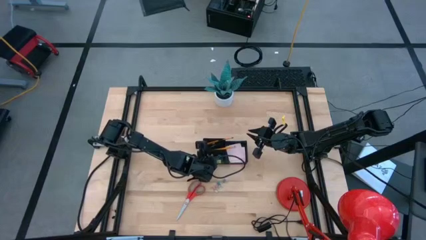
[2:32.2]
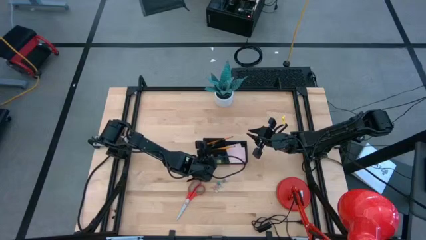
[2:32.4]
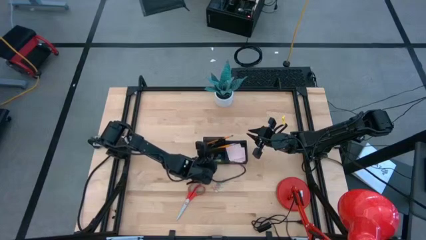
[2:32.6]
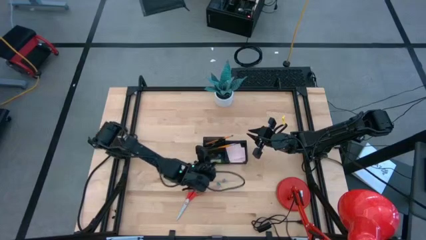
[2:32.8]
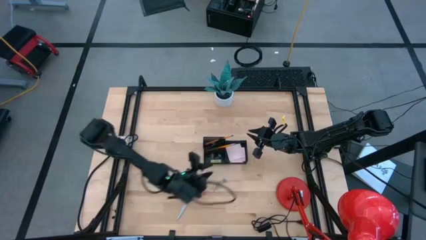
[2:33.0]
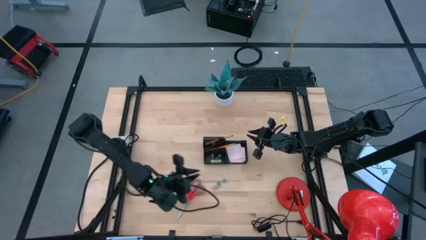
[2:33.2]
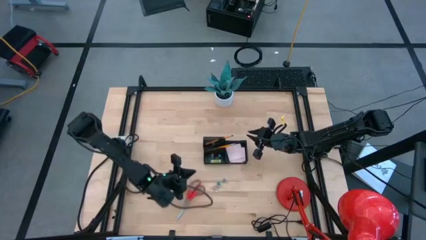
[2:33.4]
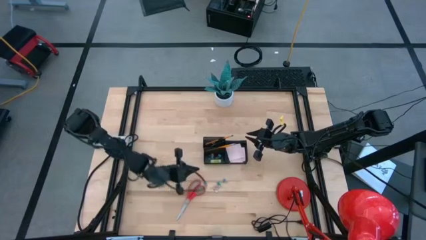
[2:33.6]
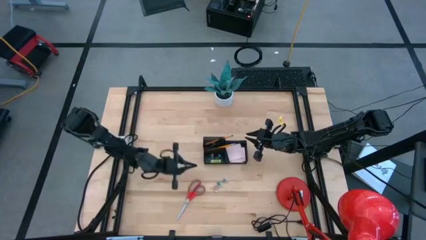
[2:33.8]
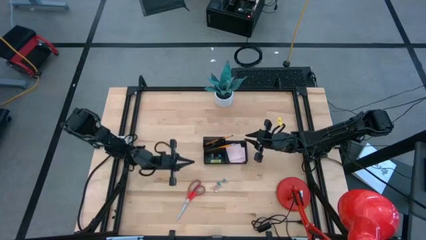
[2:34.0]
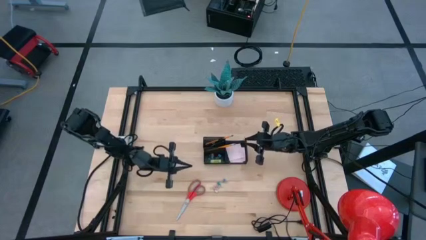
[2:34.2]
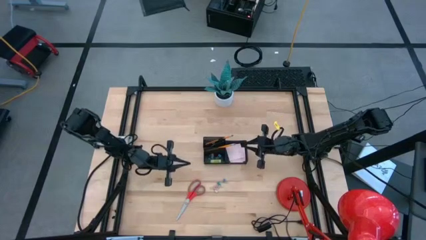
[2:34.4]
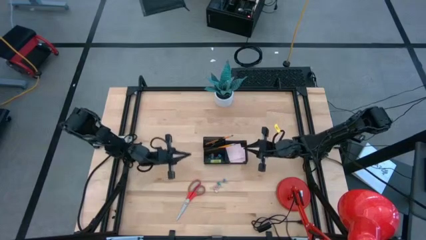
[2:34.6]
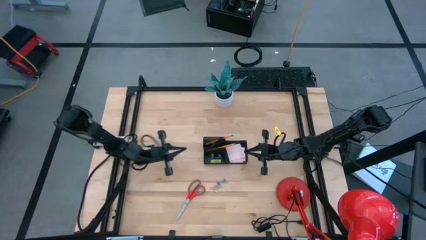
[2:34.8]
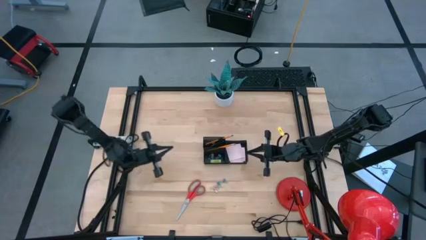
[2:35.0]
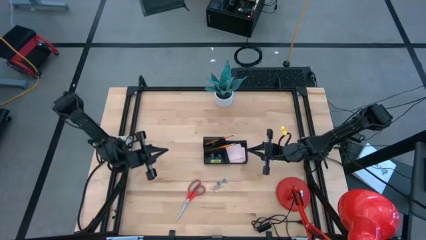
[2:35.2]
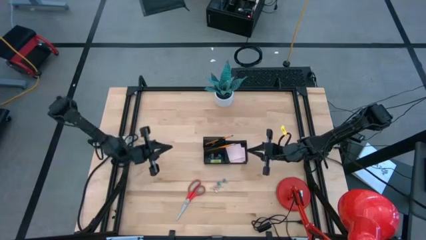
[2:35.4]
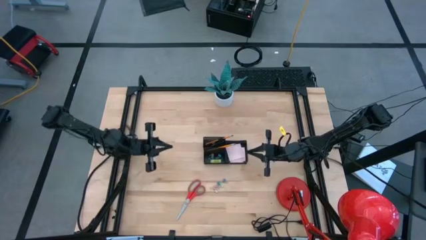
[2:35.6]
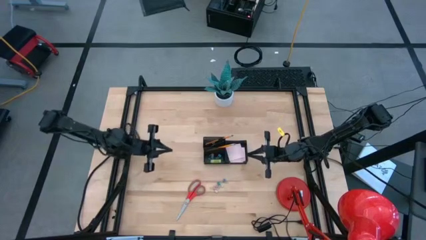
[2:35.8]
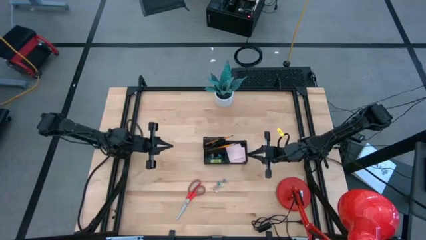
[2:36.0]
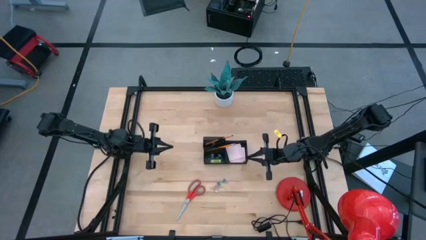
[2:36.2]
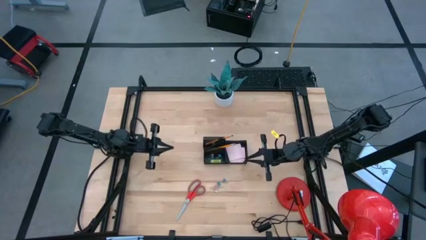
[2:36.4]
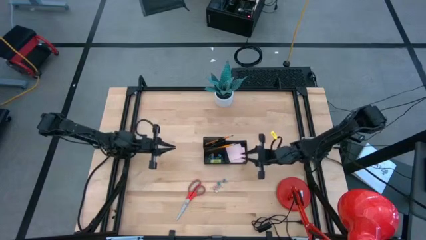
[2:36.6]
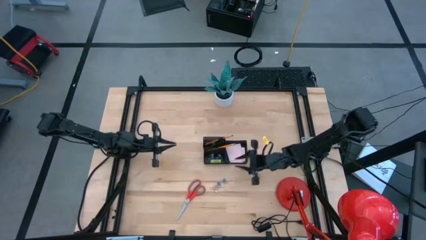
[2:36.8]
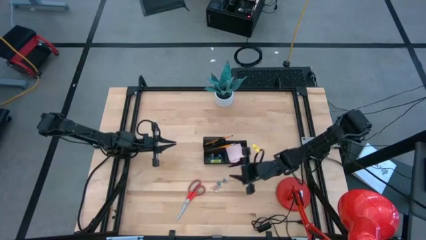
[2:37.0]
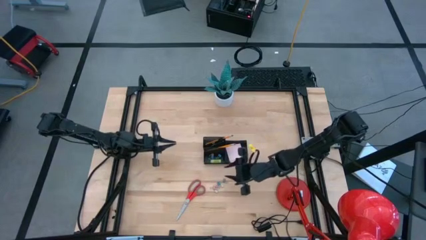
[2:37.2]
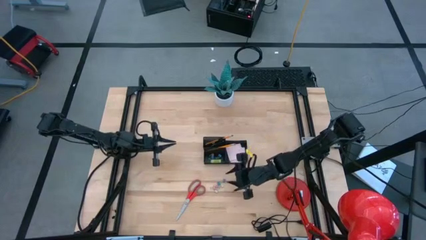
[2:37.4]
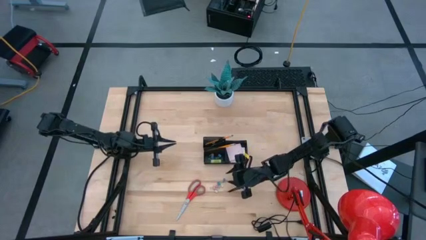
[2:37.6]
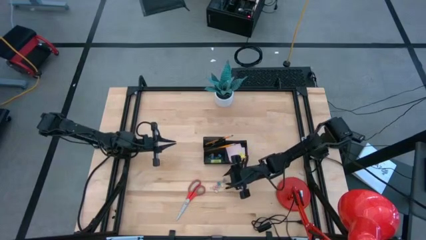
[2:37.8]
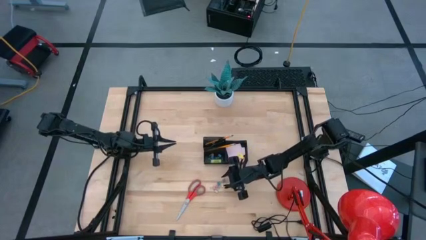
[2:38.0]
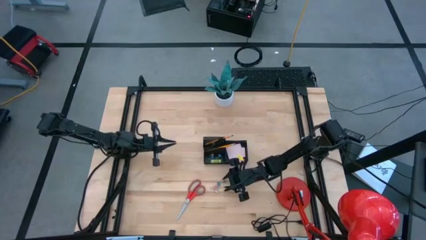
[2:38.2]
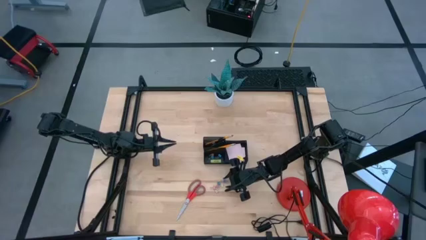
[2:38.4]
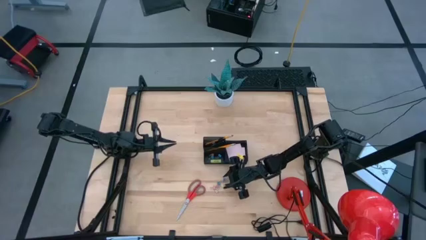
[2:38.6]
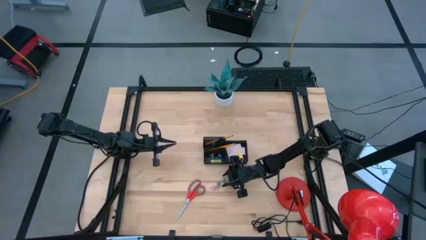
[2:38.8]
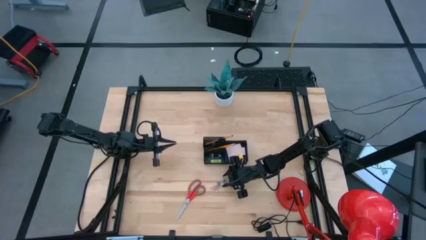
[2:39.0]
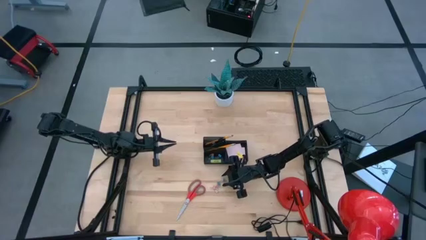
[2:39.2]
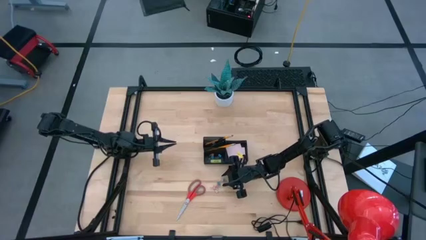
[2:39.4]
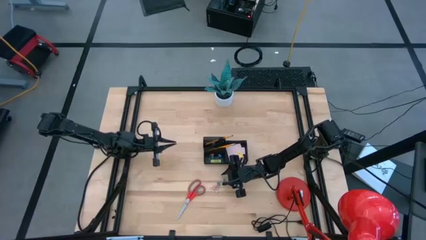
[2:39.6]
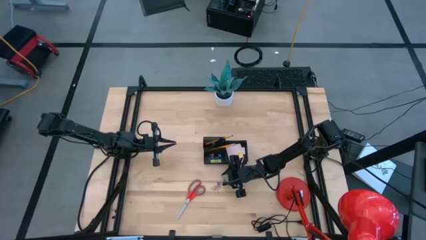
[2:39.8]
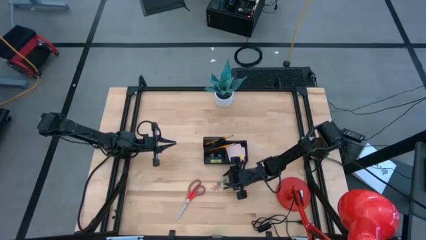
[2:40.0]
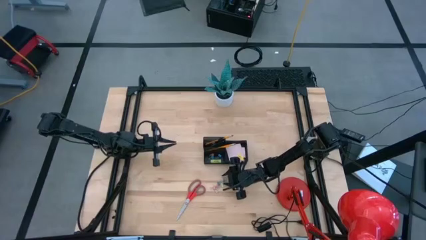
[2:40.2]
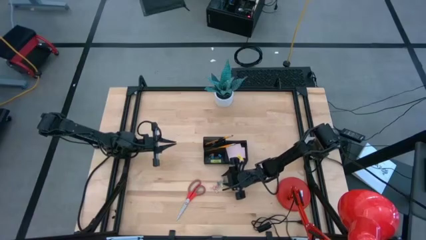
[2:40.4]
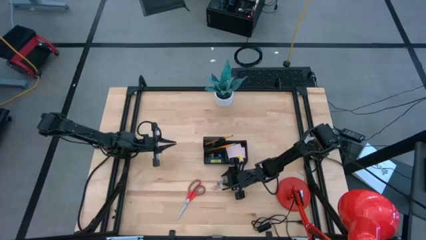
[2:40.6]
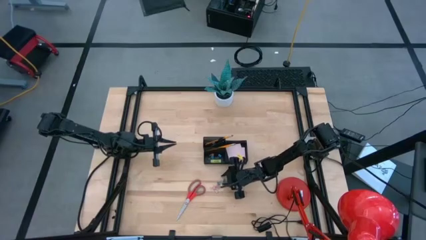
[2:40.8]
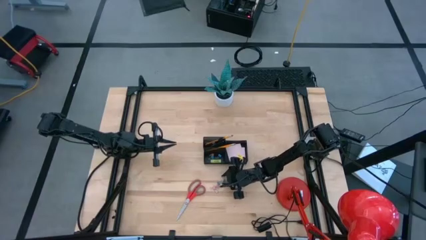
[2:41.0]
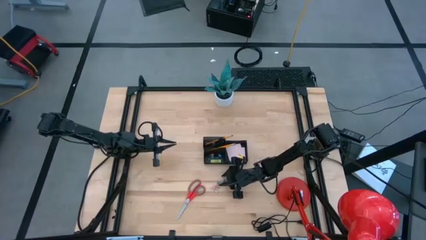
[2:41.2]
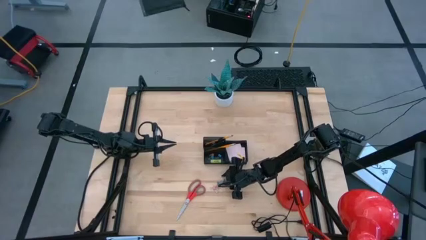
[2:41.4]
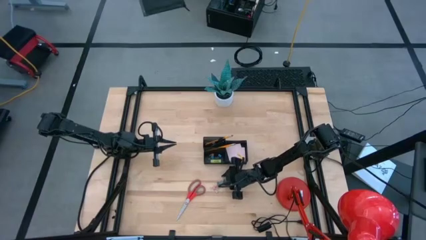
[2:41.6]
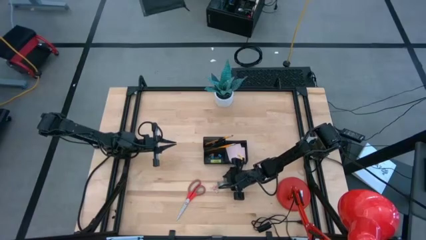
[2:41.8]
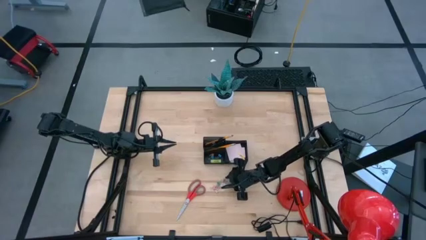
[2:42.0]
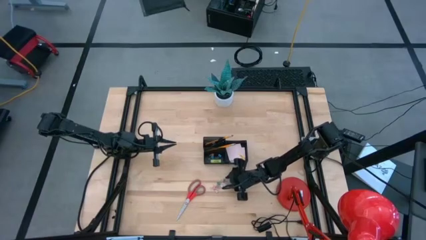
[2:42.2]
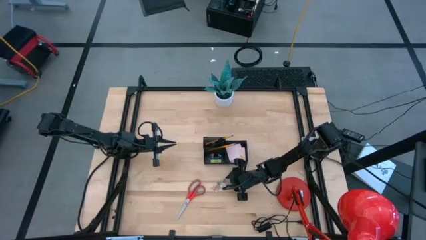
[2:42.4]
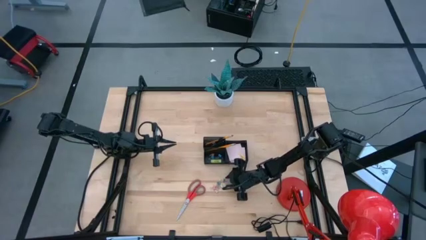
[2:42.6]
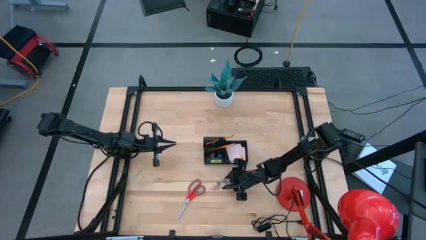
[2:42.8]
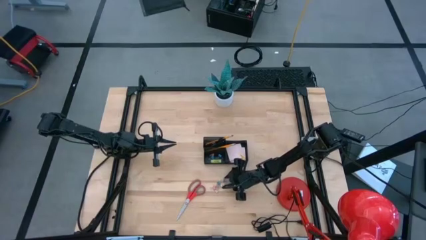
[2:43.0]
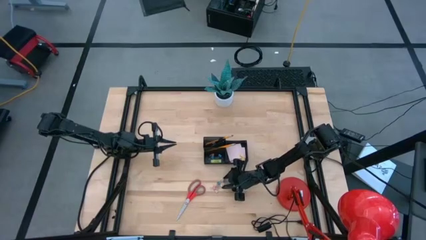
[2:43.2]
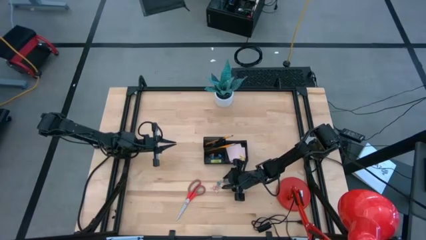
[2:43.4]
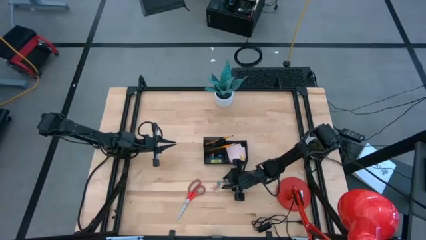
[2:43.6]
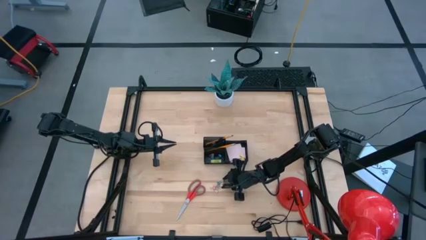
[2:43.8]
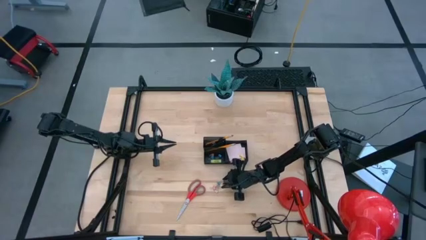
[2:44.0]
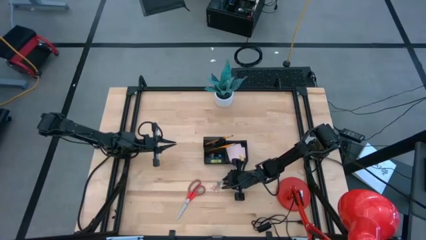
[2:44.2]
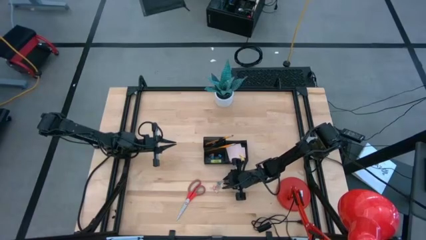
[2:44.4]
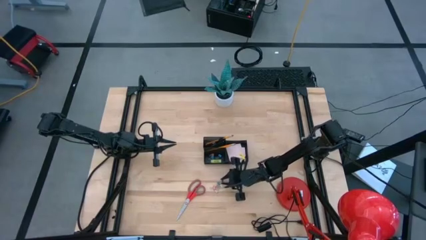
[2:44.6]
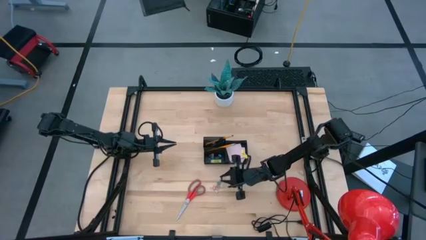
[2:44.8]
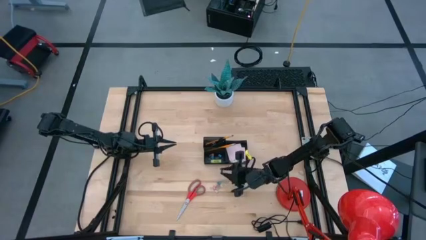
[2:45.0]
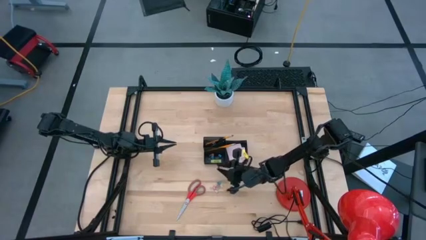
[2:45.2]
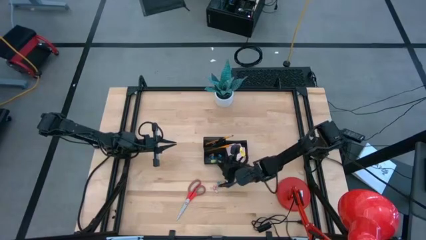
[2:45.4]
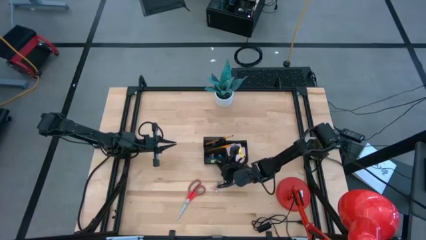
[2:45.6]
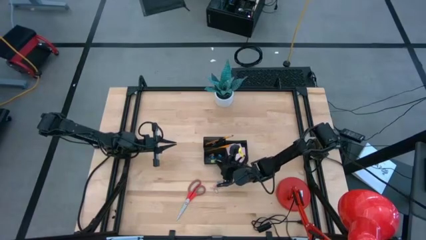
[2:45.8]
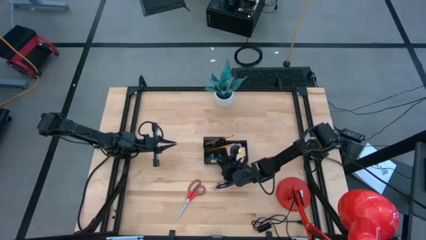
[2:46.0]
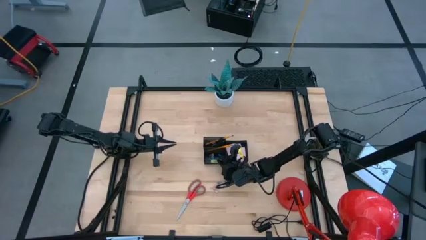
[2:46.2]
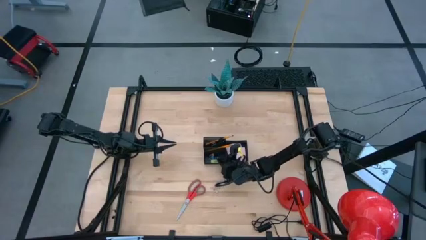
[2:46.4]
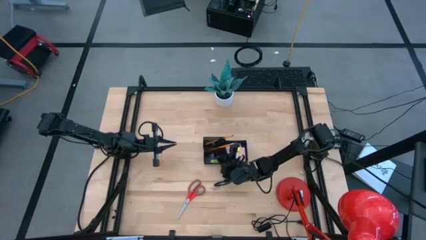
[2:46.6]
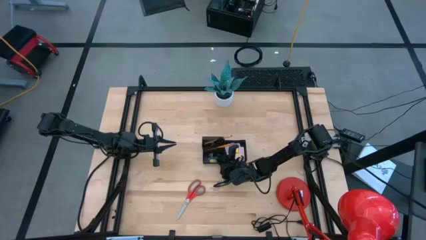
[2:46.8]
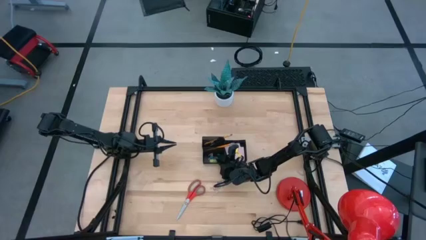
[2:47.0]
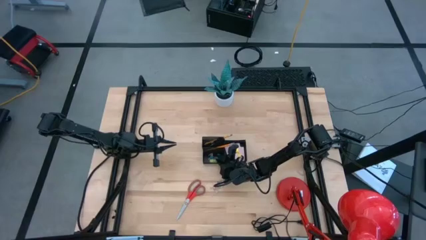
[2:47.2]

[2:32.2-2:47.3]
Task: Pick and place office supplies into organizer
Put the blue binder clip into the desk organizer

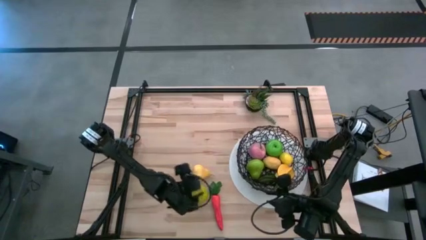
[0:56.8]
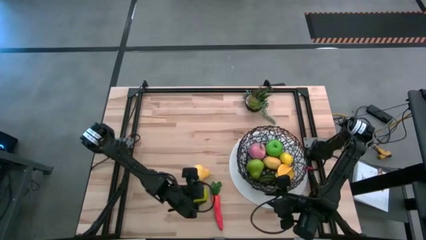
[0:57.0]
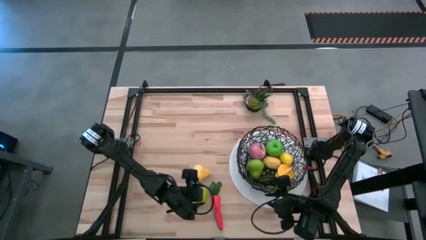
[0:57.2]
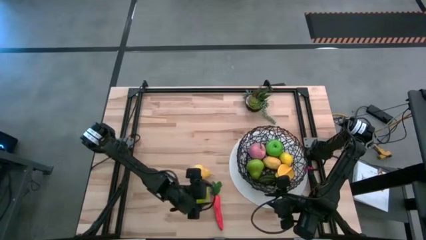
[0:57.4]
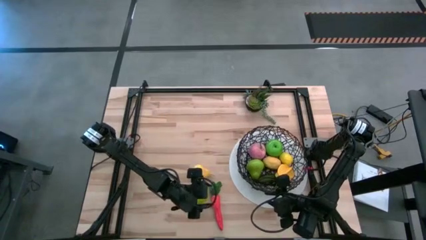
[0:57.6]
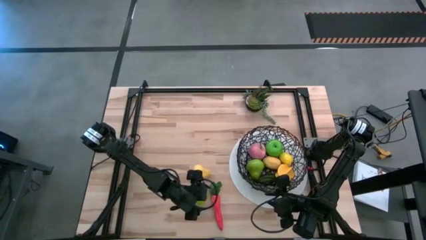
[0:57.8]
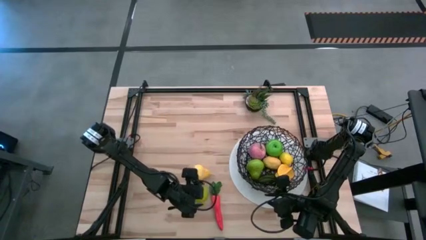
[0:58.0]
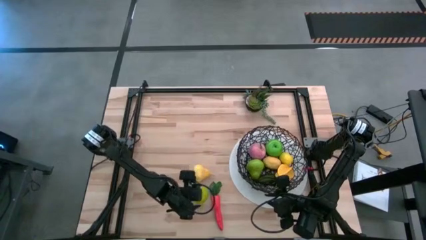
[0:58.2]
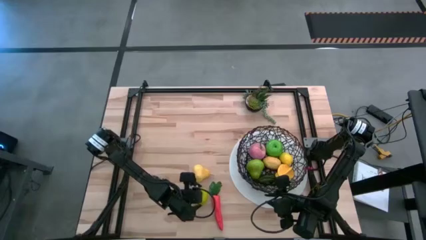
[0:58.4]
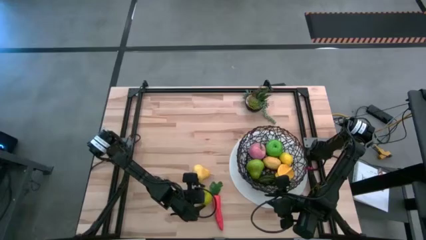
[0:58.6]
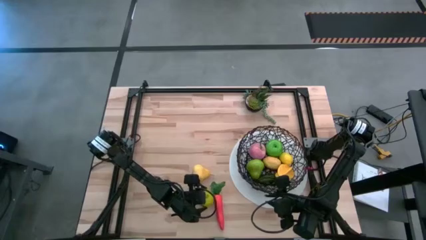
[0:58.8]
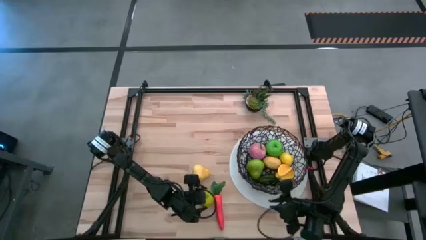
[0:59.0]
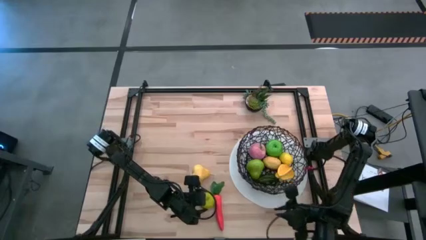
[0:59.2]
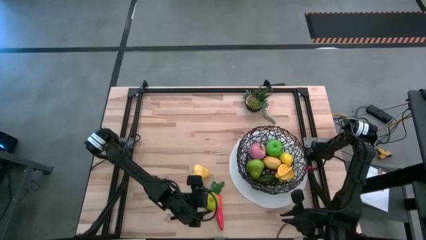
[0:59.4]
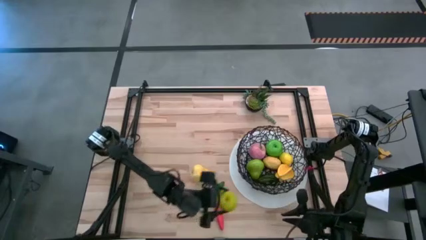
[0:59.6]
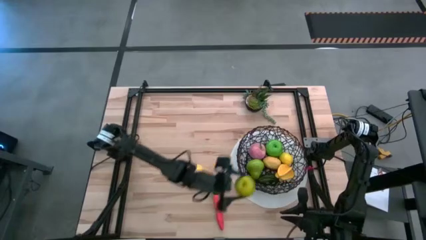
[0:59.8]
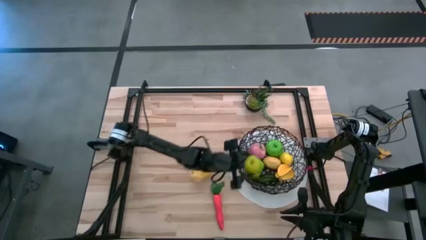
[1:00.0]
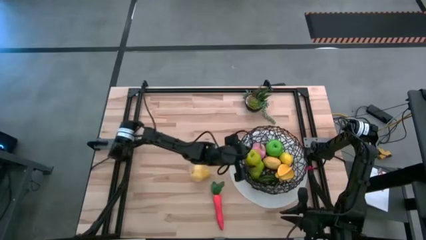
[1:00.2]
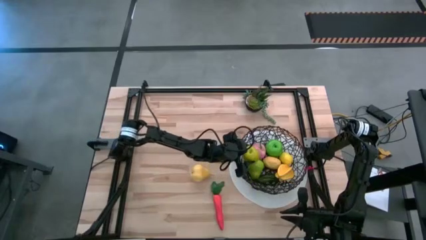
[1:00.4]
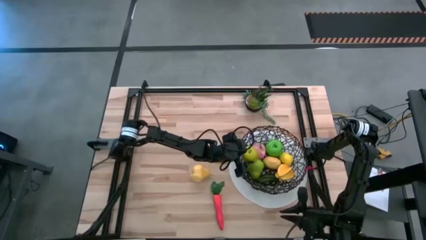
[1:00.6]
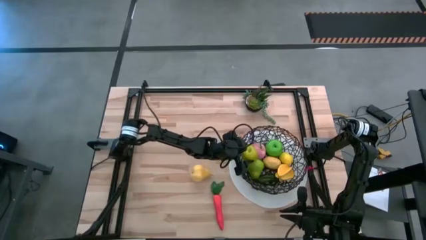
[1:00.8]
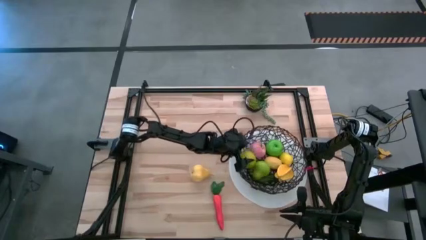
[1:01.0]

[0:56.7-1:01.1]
Task: Build produce basket
Put the green apple into the wire basket
